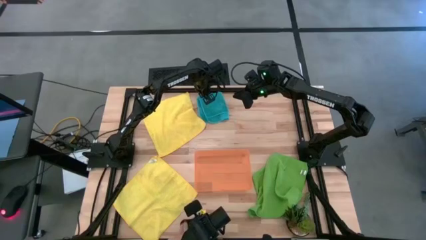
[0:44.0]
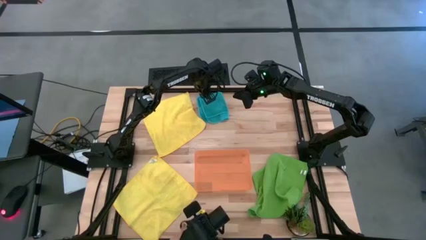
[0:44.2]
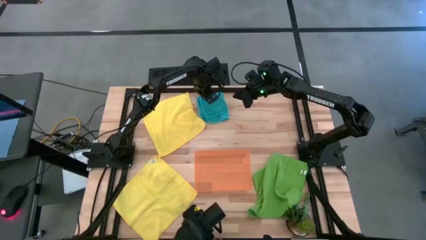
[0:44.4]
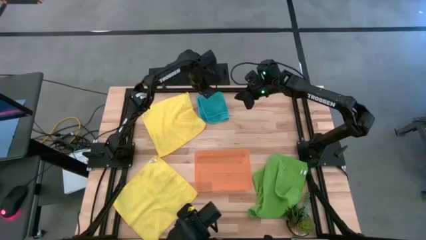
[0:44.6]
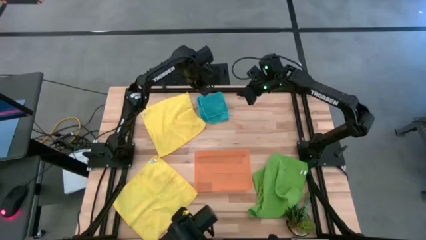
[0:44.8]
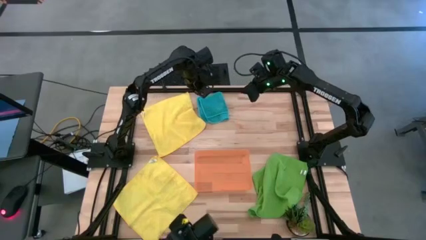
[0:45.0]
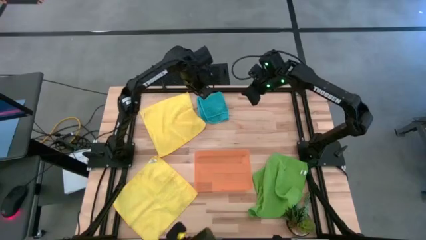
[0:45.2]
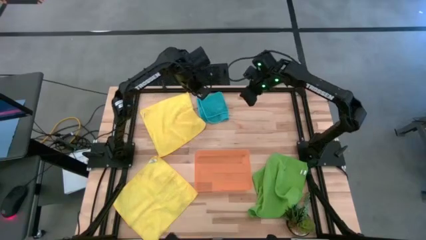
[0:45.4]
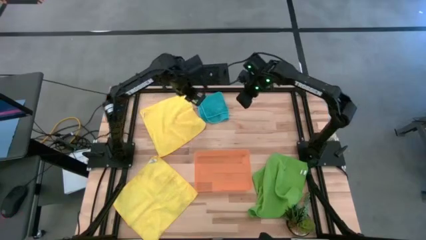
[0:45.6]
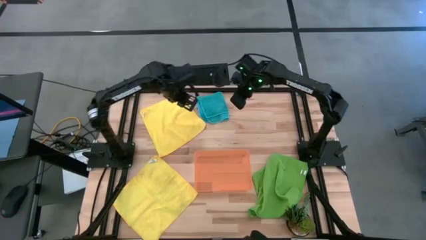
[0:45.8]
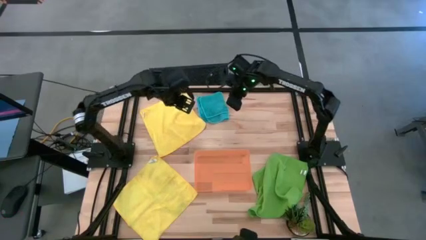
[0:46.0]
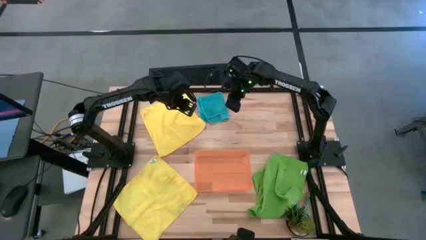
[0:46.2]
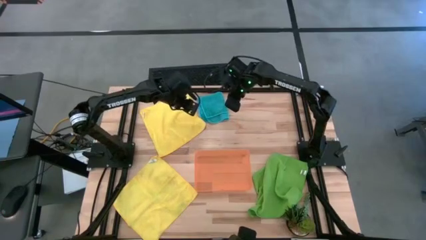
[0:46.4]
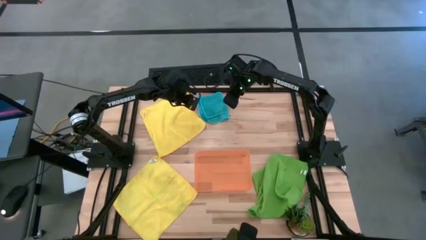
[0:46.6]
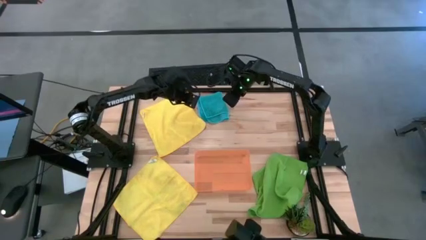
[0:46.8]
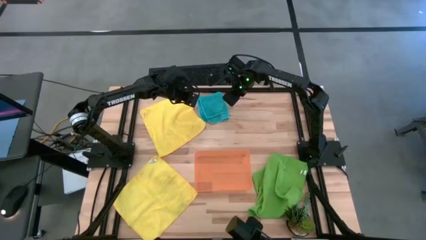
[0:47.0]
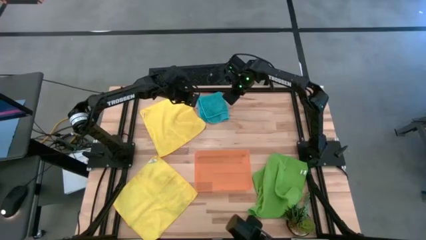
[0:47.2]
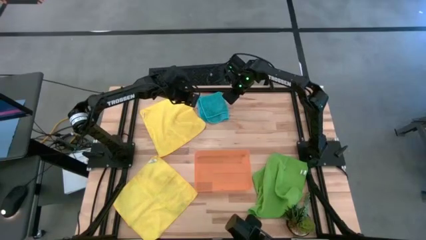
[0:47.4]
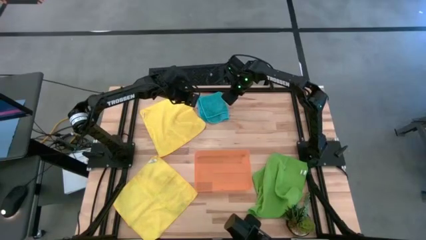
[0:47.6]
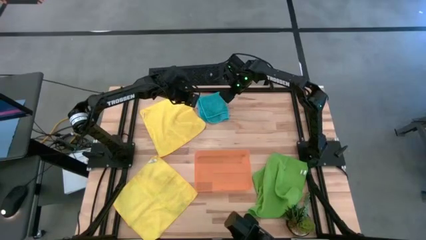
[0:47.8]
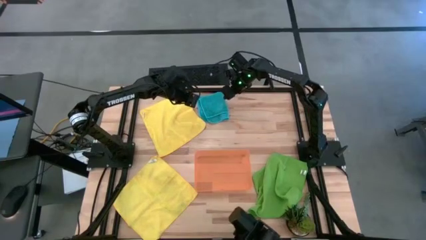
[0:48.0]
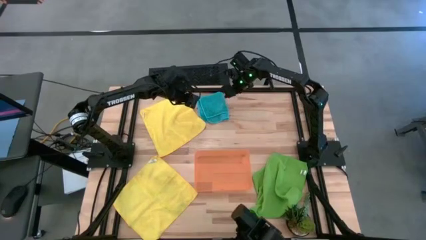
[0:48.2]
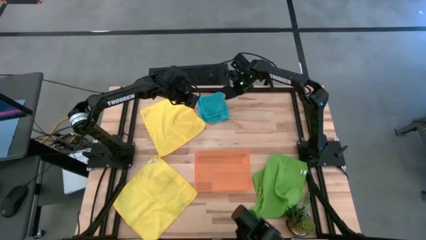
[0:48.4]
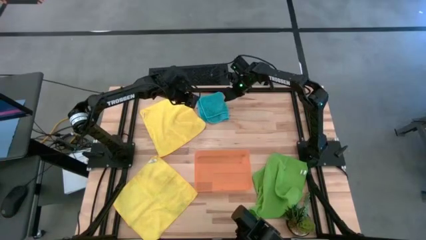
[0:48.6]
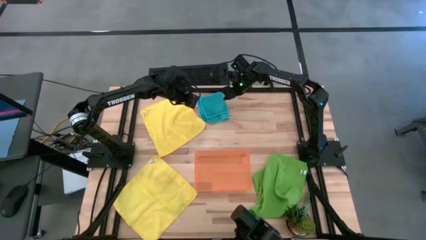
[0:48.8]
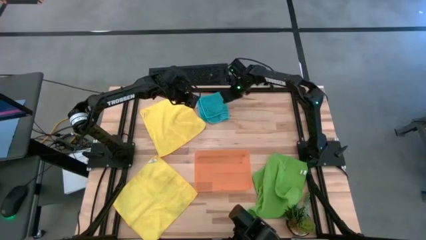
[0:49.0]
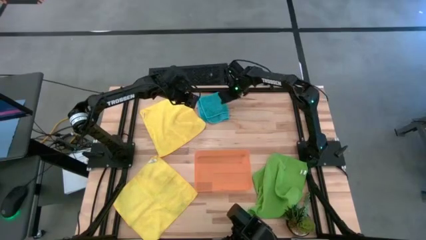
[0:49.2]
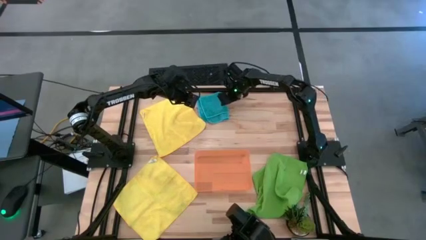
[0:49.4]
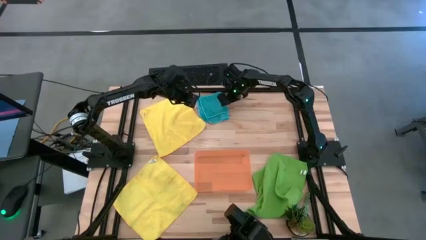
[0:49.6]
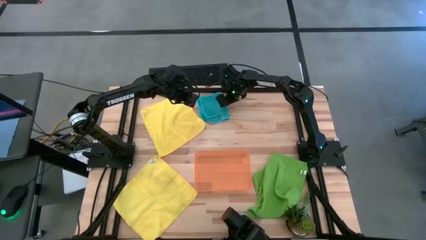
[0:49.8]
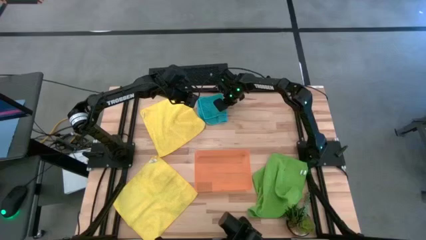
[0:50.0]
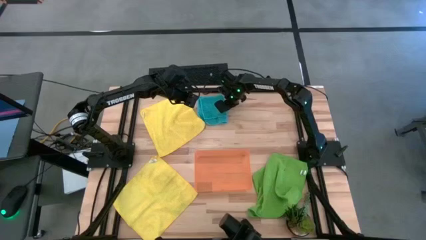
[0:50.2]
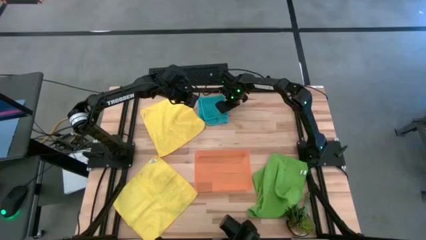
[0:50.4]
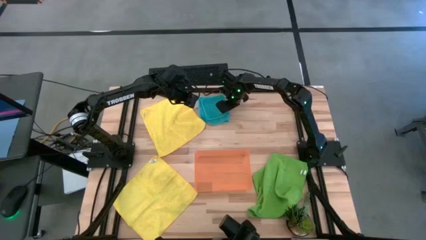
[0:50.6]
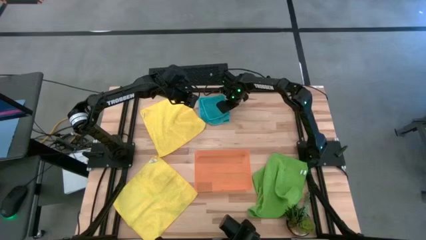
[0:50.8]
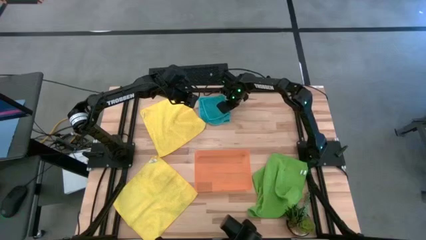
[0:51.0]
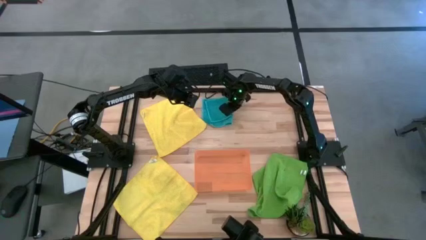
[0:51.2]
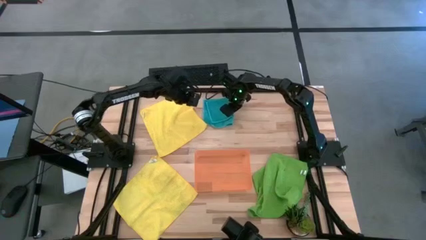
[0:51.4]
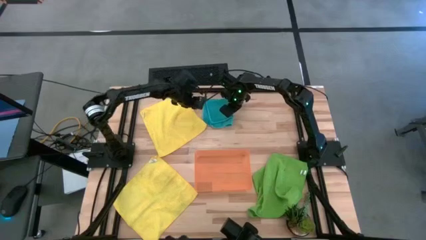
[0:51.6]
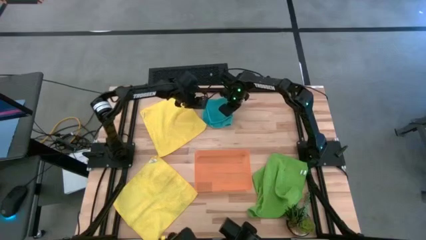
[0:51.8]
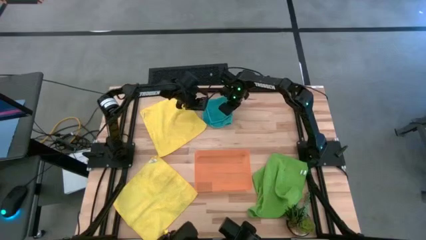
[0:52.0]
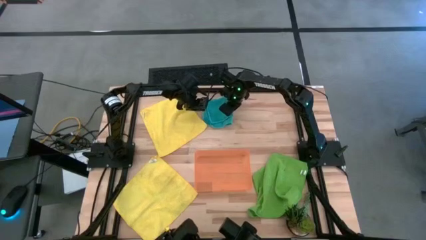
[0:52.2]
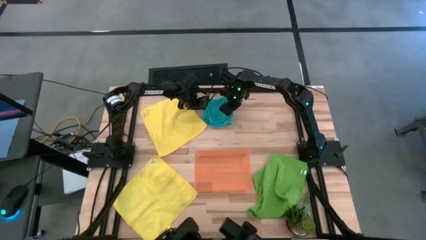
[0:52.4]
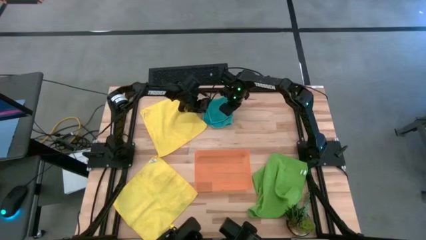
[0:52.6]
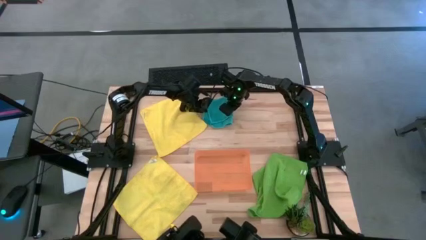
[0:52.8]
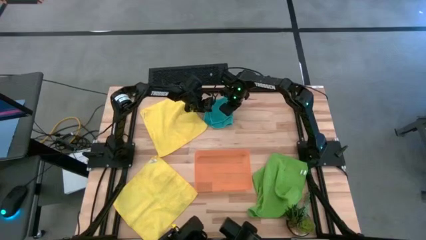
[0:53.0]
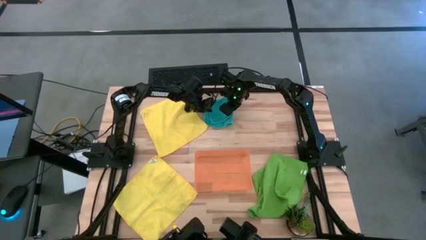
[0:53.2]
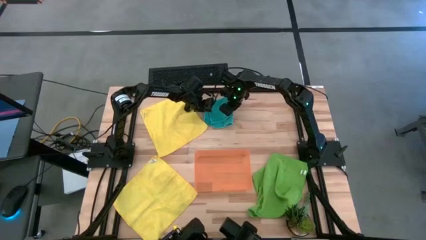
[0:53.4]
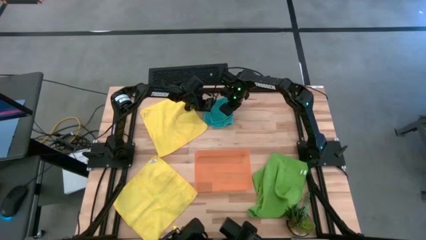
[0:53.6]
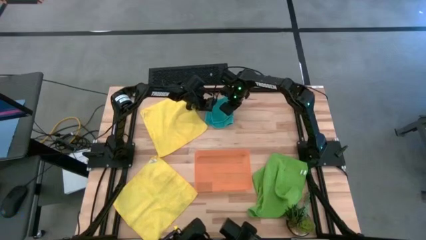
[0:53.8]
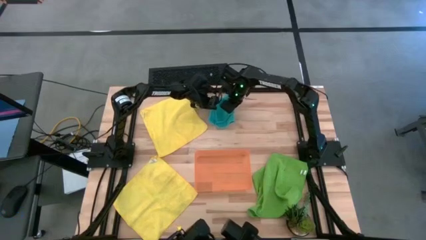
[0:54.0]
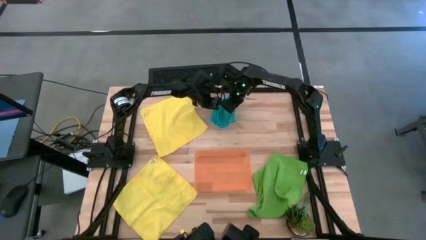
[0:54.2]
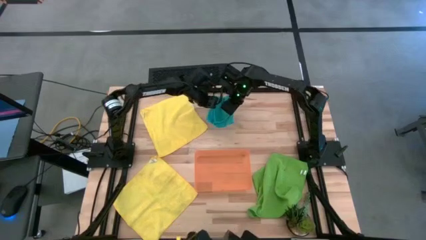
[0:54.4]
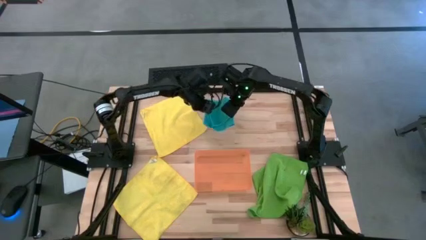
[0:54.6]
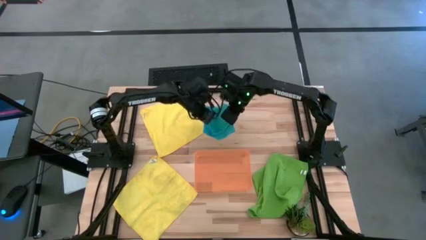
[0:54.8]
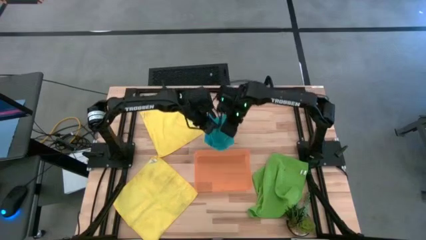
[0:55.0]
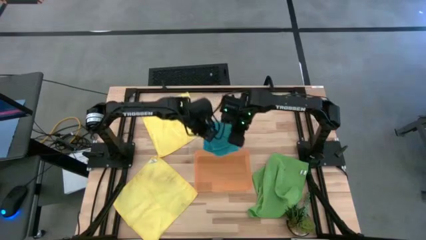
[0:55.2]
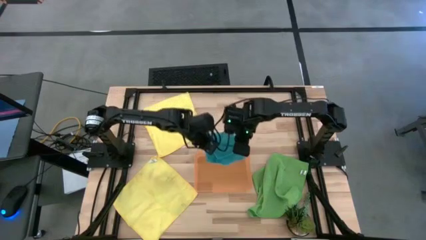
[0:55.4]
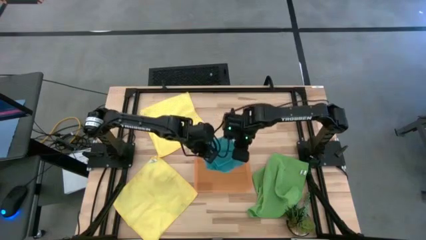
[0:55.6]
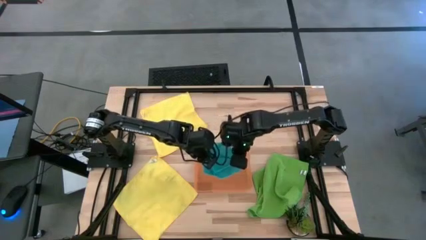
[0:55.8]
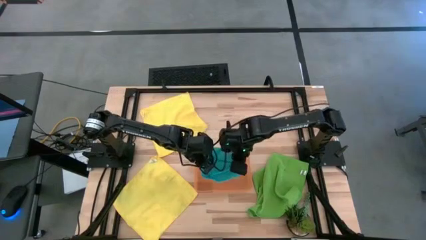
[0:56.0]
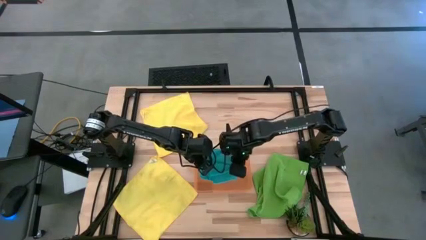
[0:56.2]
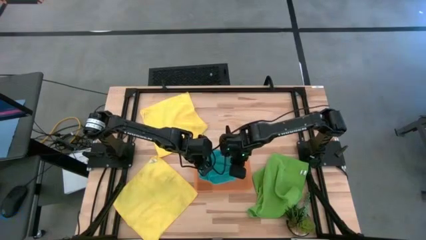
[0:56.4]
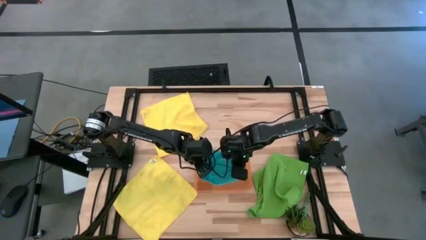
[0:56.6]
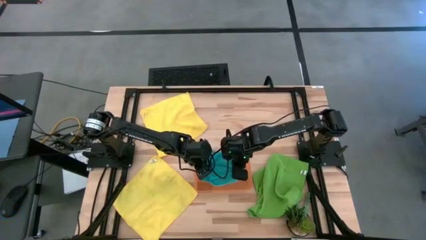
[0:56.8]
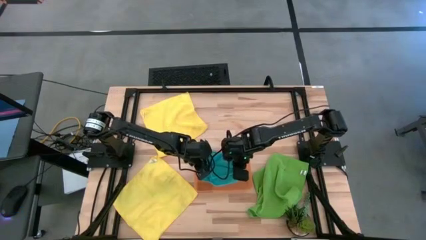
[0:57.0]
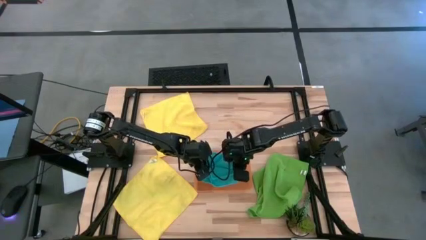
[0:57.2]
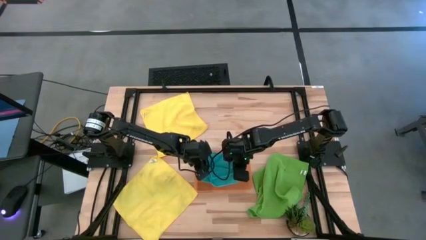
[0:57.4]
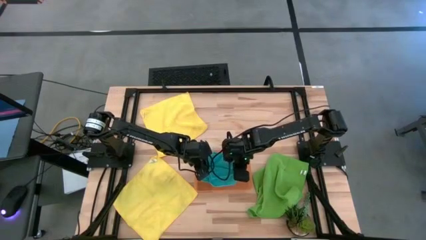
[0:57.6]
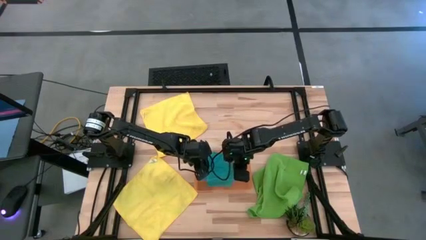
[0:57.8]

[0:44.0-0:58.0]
Task: Fold microfiber towels
Put the blue towel into the bin
